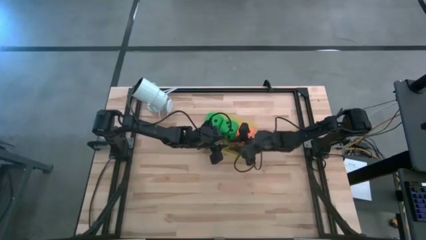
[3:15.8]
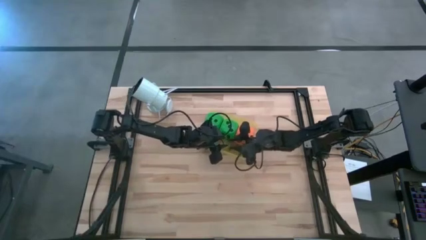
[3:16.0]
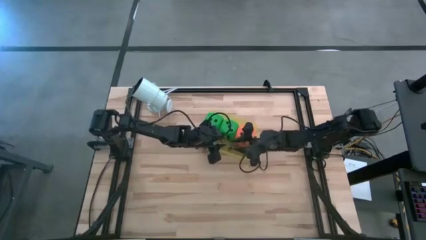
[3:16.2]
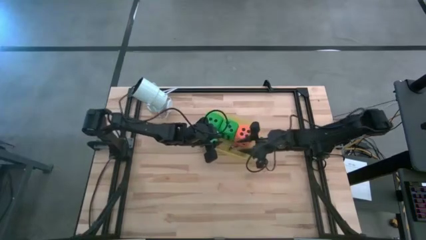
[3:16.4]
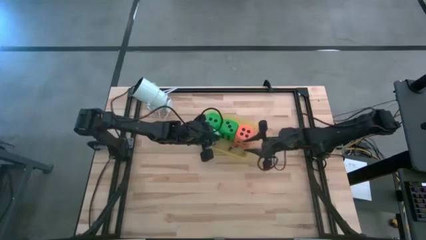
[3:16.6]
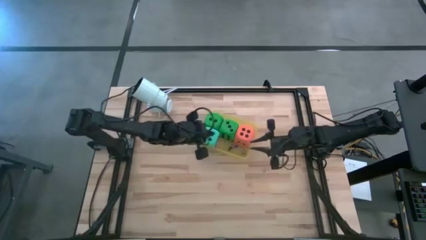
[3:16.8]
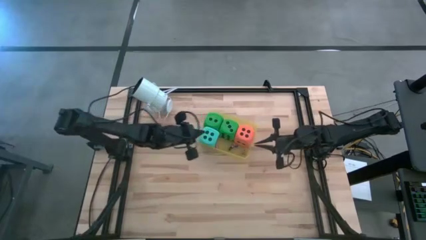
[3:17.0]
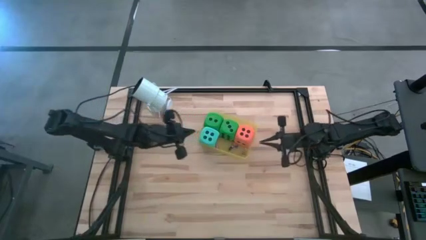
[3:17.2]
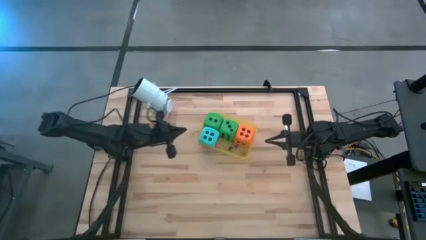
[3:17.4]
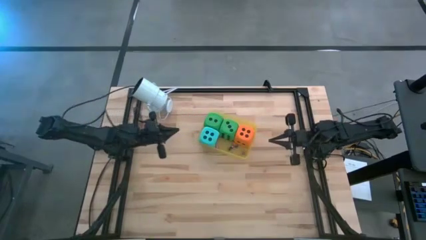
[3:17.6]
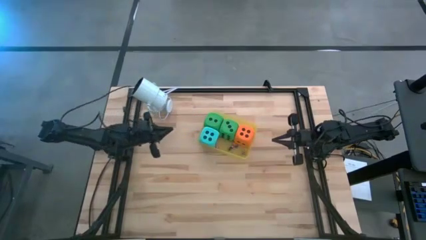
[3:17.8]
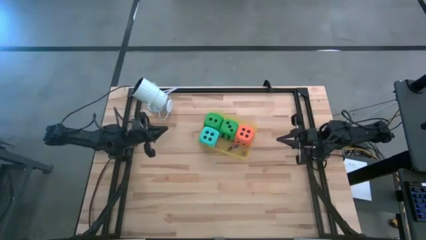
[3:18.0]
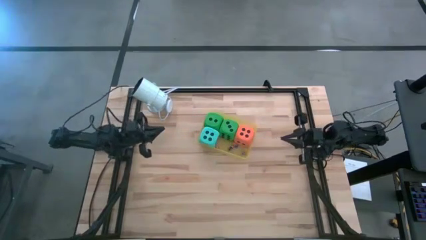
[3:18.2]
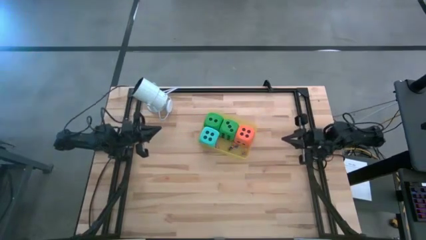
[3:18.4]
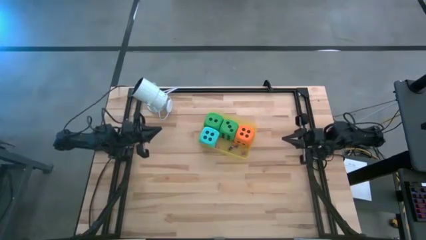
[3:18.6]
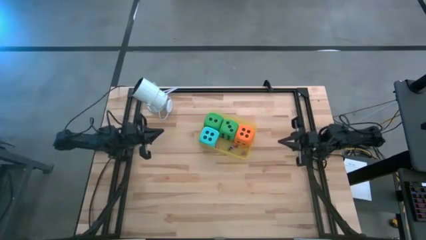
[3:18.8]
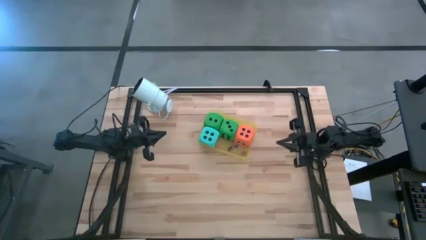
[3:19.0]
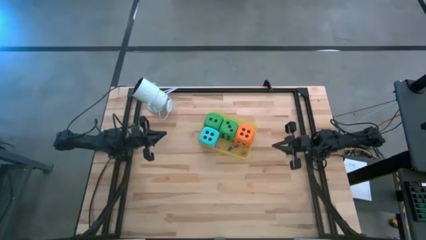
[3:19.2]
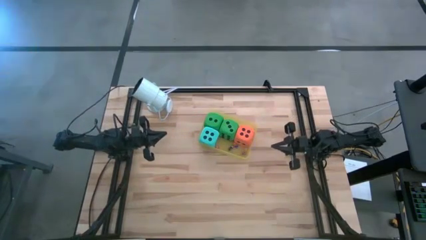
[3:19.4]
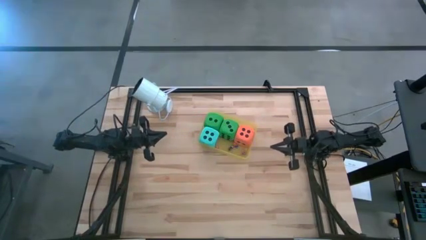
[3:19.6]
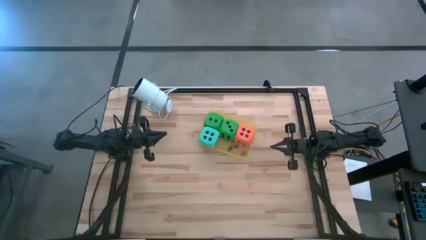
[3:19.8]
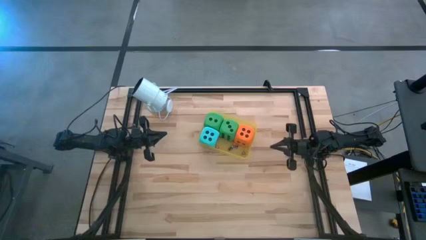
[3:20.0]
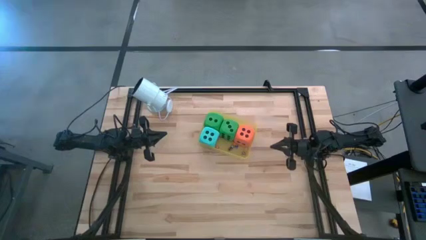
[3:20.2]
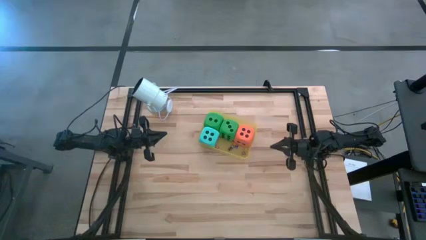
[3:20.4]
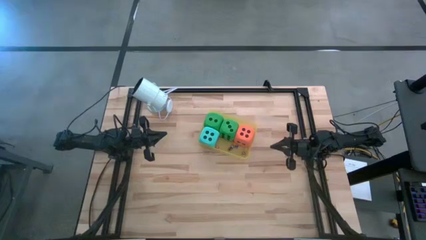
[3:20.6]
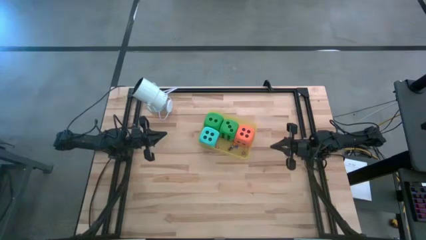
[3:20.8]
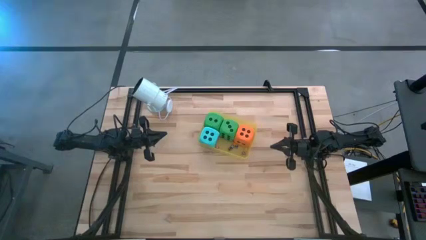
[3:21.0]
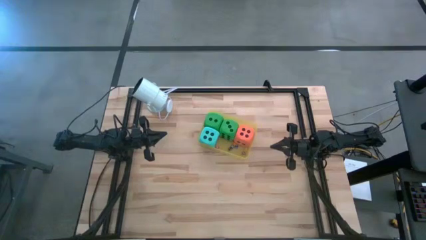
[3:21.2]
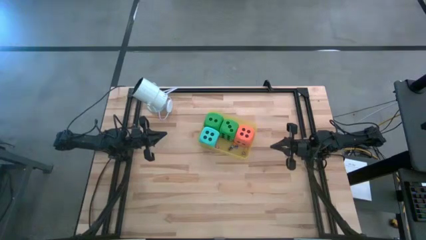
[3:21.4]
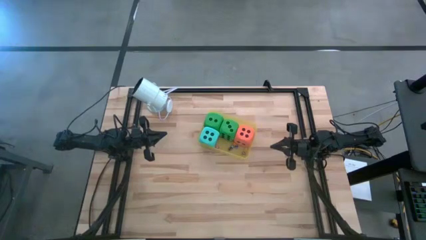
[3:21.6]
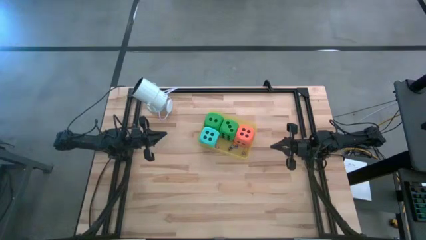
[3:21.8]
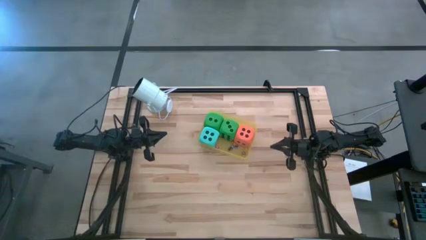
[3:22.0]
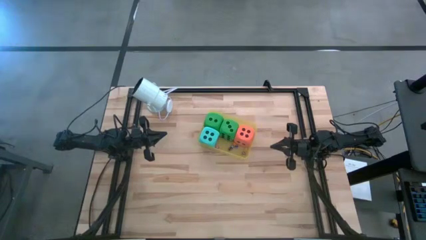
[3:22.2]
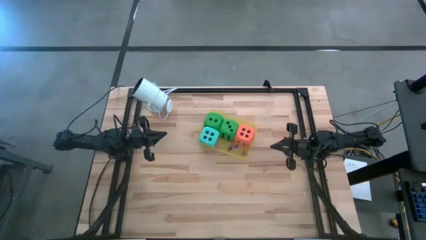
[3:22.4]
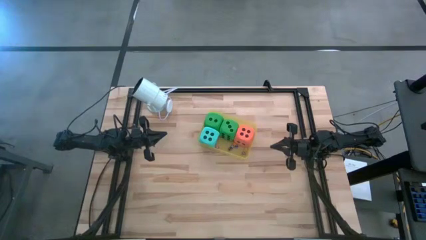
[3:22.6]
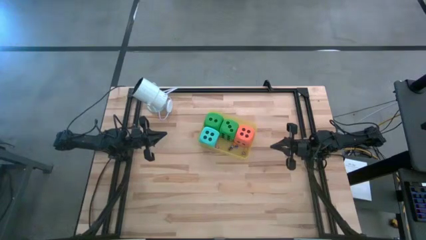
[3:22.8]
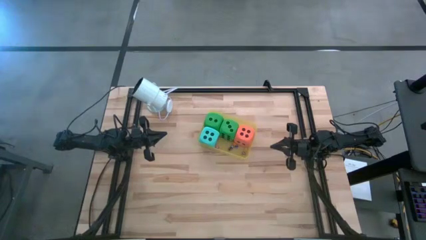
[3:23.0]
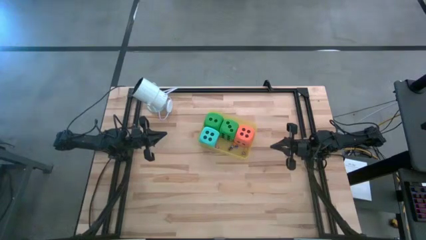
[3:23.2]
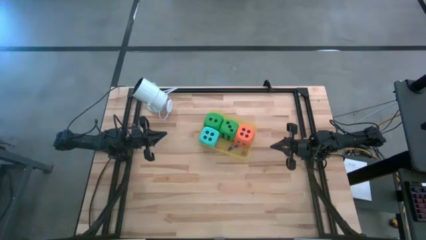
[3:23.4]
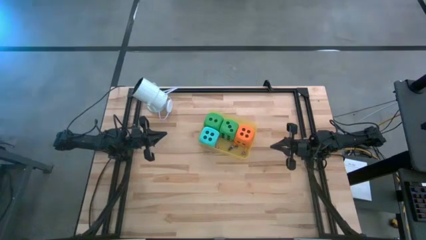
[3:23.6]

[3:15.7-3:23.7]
Task: Pick & Place Dice
Return to Home Position

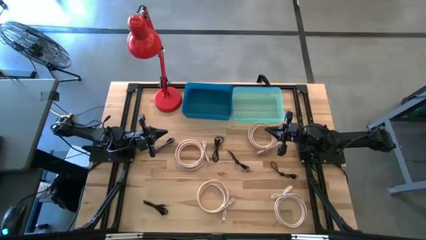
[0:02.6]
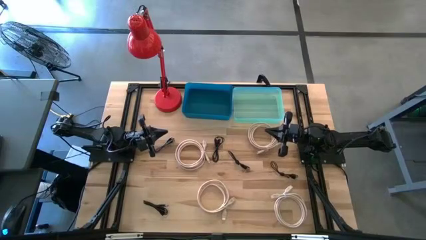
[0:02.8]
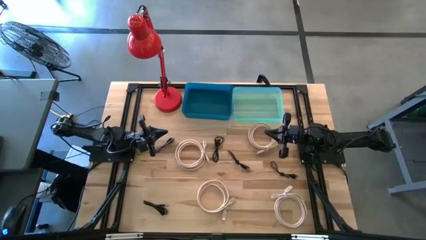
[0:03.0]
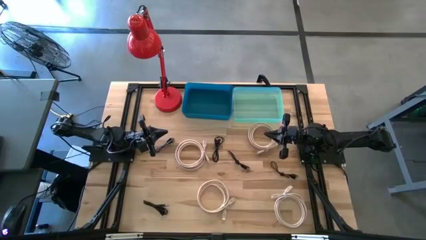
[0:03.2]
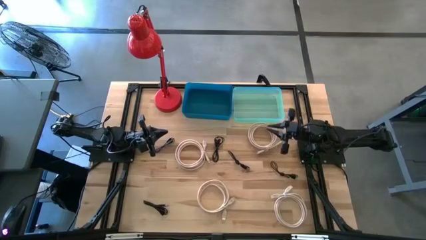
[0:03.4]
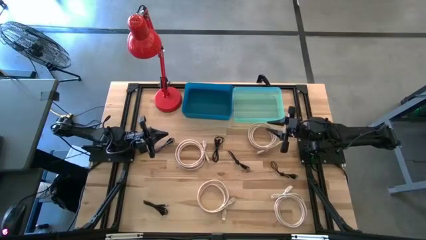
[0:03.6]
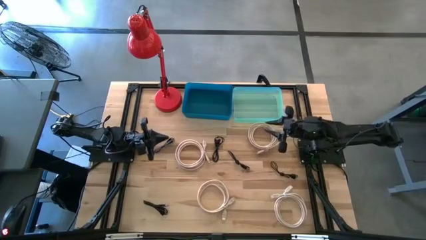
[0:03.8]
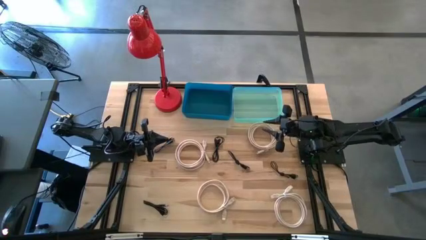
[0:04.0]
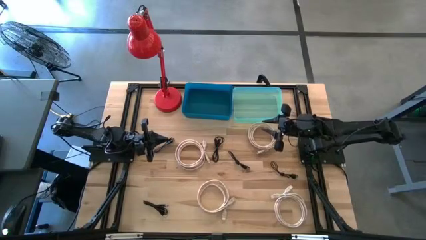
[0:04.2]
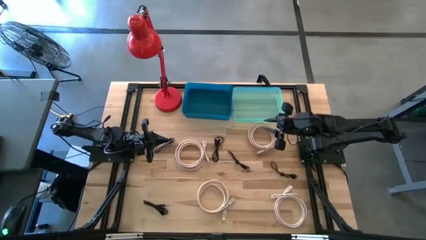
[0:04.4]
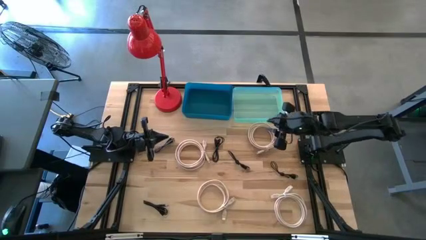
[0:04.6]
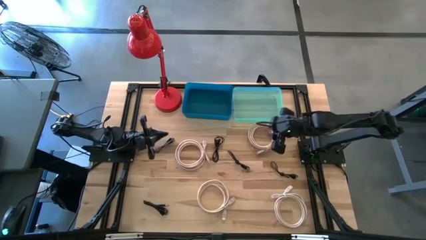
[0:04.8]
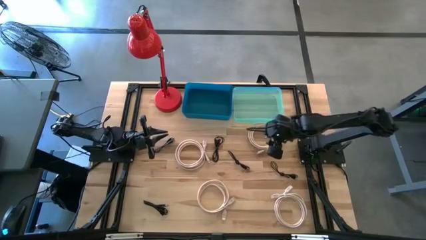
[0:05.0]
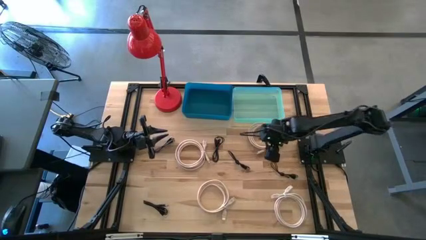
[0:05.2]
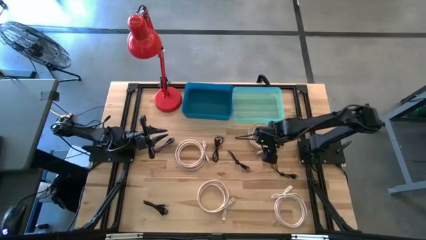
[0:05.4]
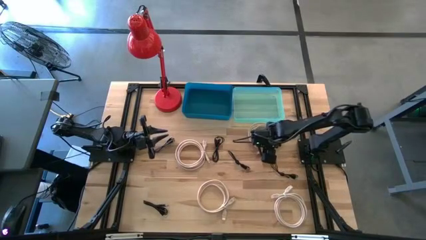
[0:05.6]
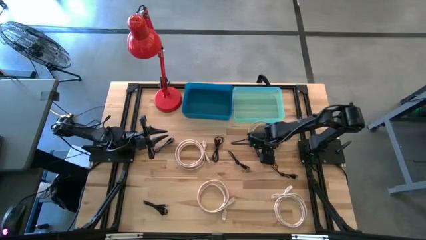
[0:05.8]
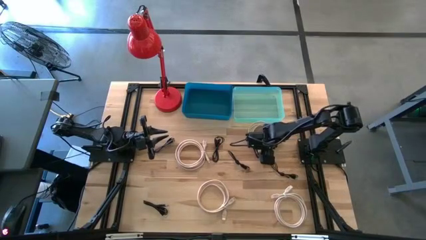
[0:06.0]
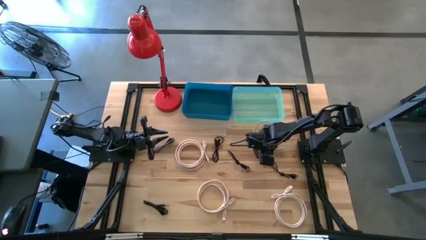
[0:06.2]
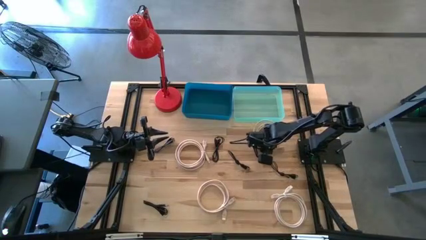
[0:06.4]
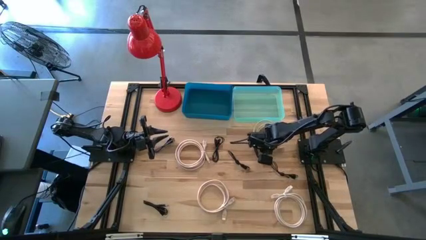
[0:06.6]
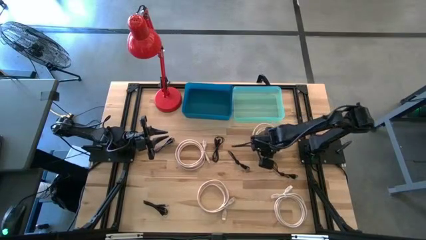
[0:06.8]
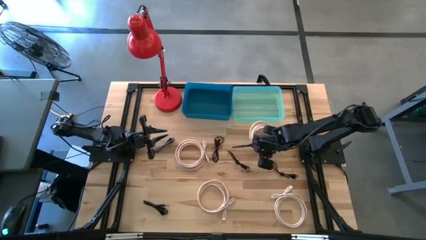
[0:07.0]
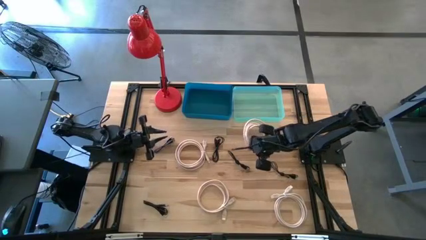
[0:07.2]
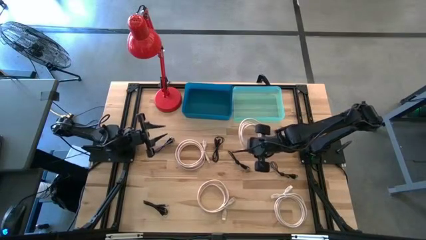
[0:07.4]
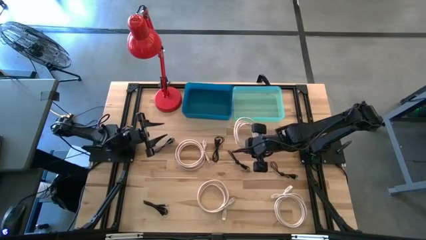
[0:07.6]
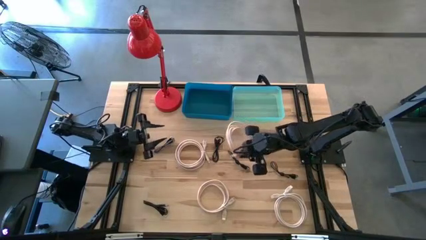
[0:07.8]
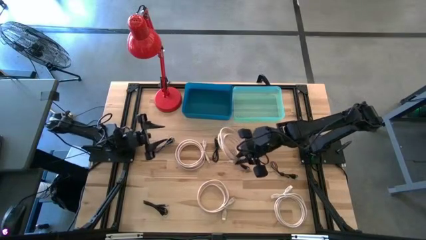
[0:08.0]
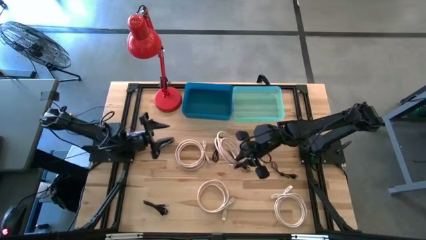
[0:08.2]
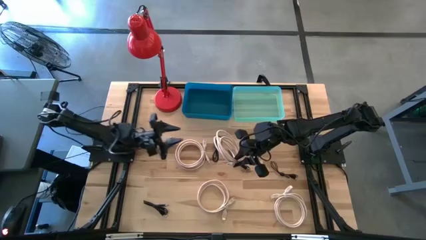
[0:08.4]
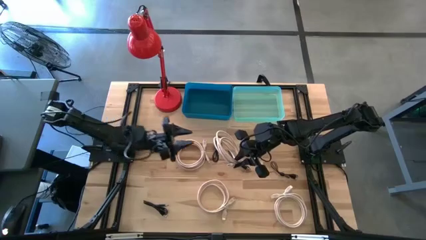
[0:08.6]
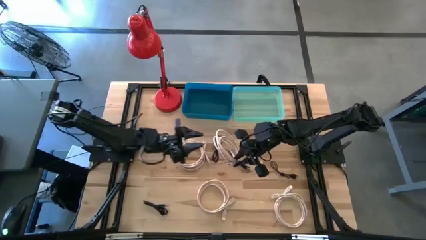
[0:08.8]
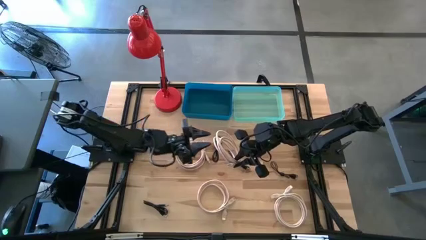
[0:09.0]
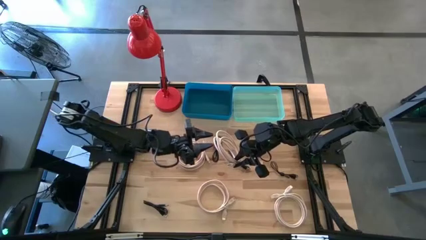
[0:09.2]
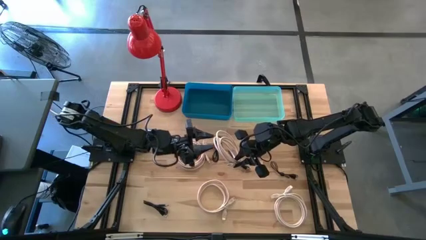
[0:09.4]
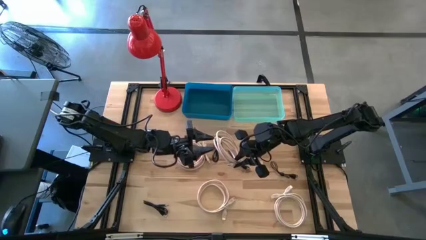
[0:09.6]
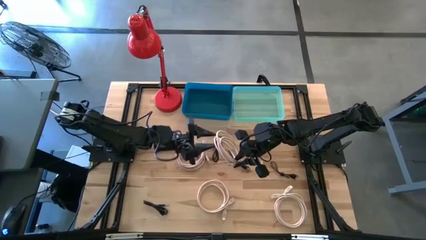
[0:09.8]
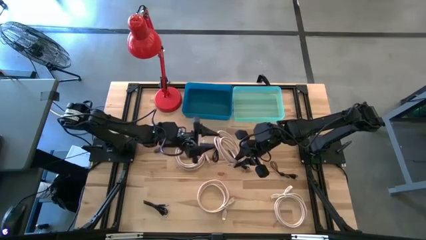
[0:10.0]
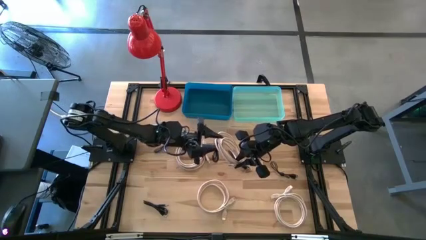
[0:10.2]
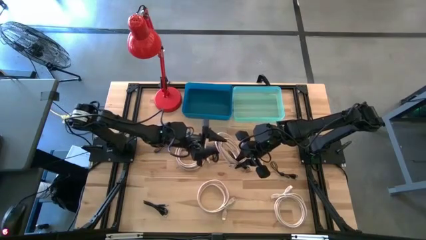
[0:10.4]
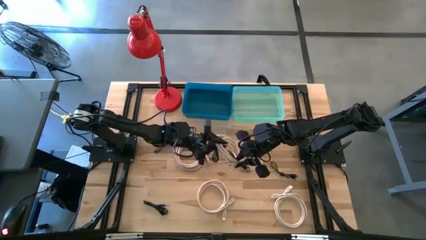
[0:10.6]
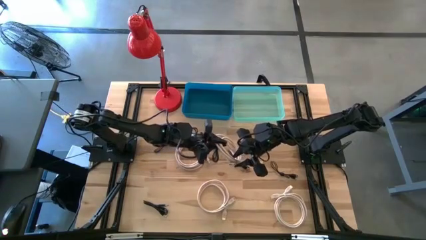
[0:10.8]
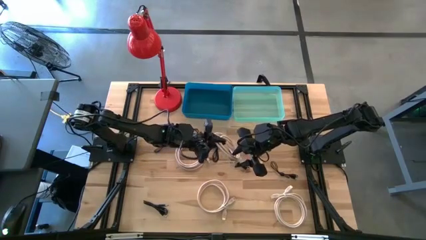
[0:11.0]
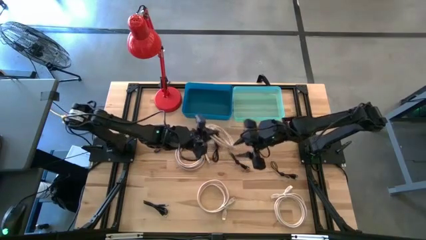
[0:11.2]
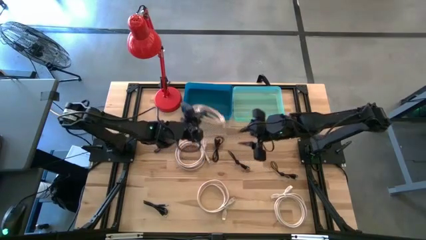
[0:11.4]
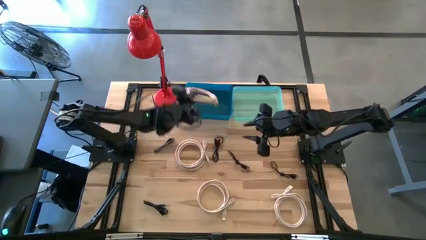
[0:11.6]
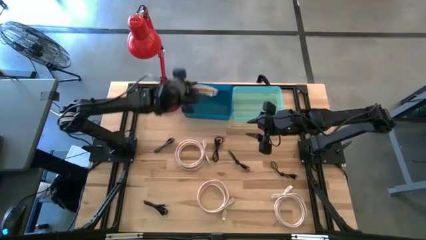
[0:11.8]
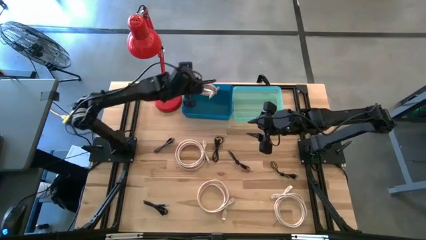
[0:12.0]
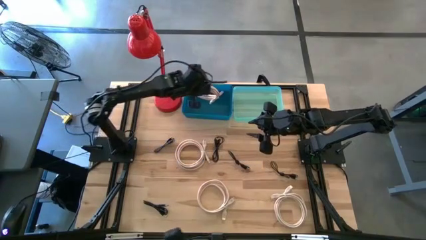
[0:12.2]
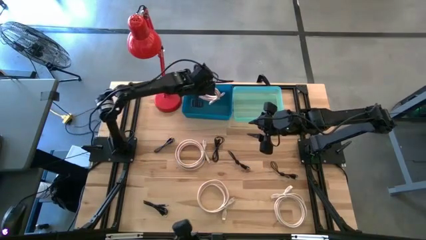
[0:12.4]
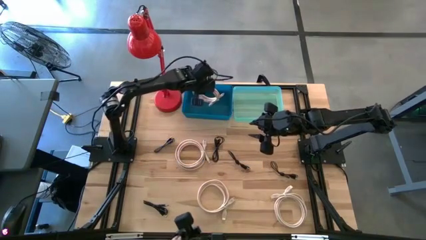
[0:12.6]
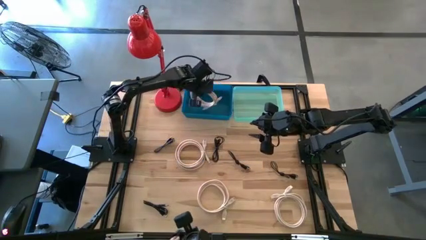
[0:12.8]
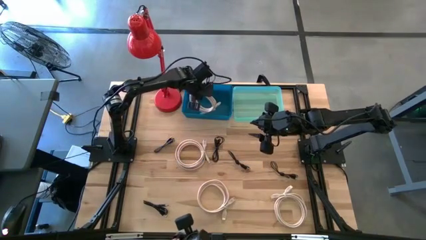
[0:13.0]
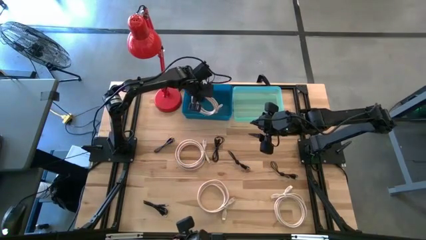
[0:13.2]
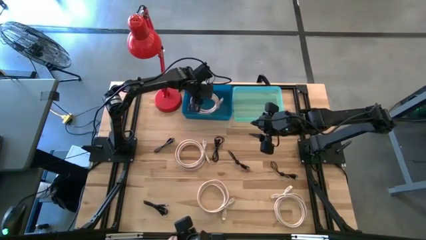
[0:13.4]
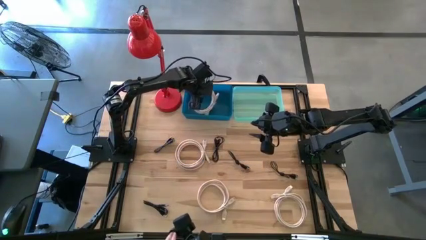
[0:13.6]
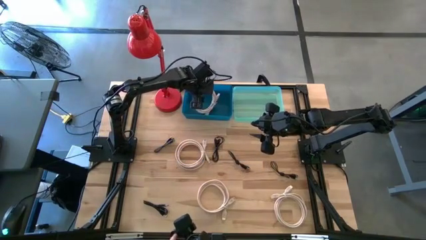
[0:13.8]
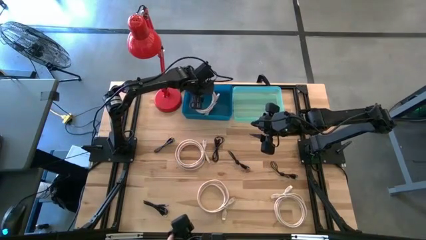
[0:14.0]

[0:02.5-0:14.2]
Task: Pick & Place USB Port
Put the brown charger cable into the blue bin
